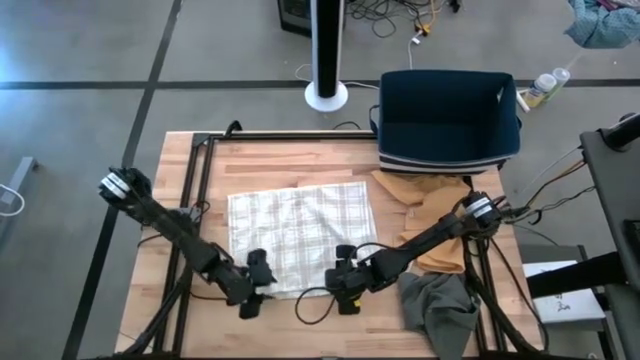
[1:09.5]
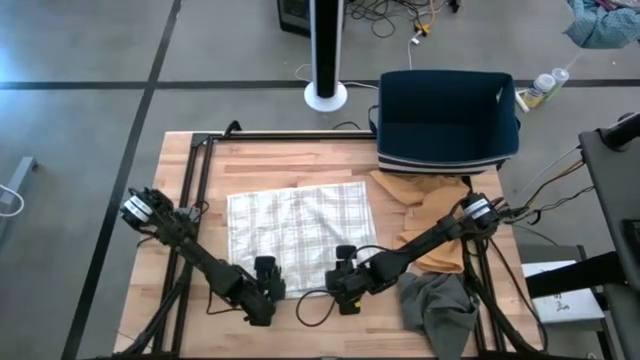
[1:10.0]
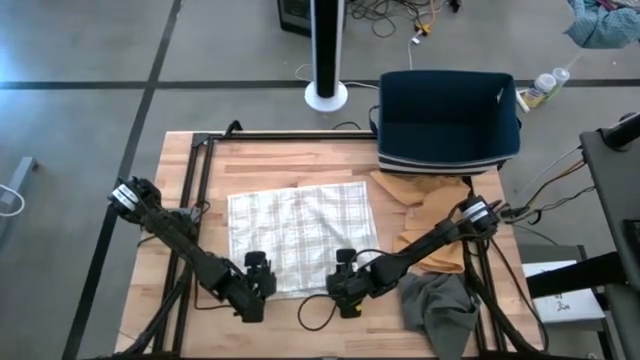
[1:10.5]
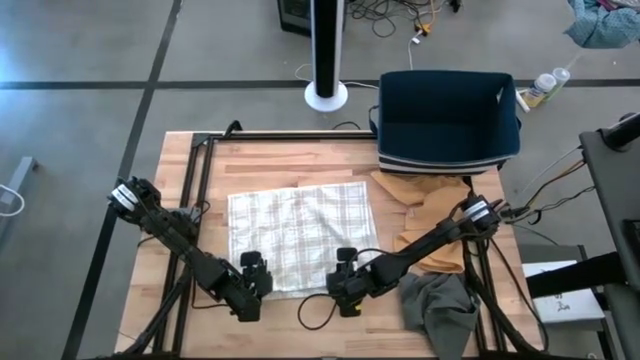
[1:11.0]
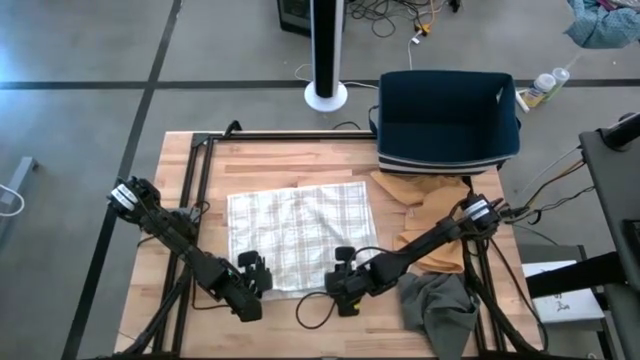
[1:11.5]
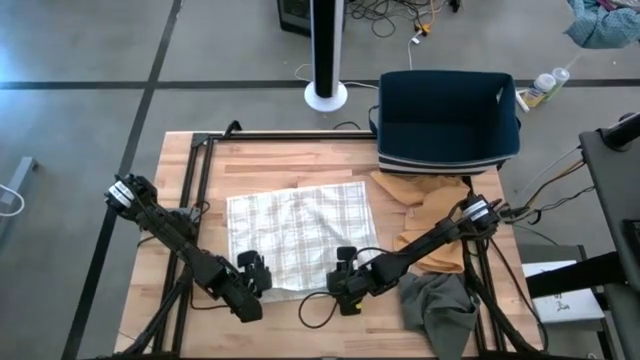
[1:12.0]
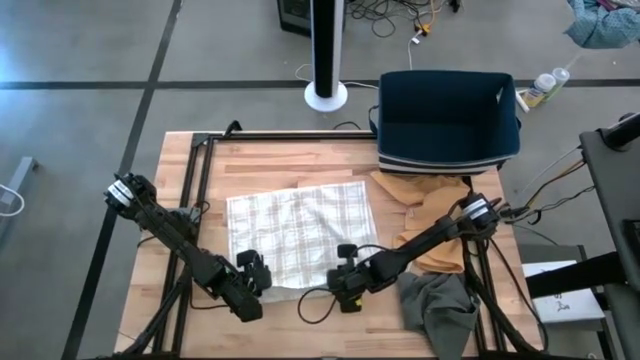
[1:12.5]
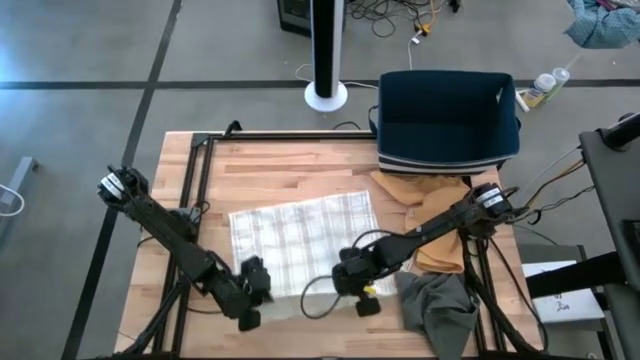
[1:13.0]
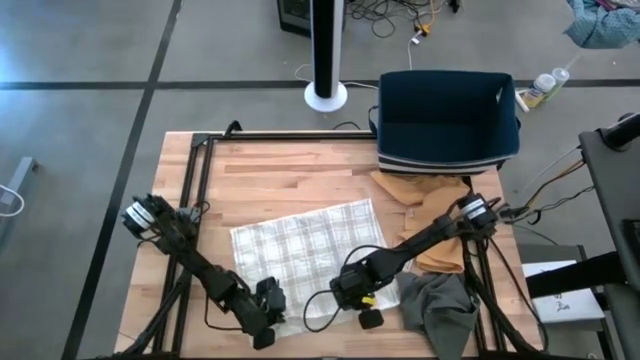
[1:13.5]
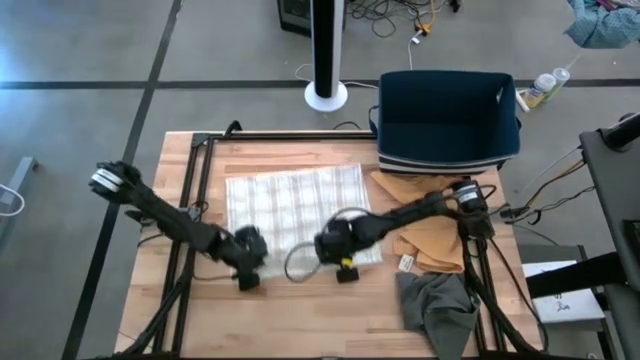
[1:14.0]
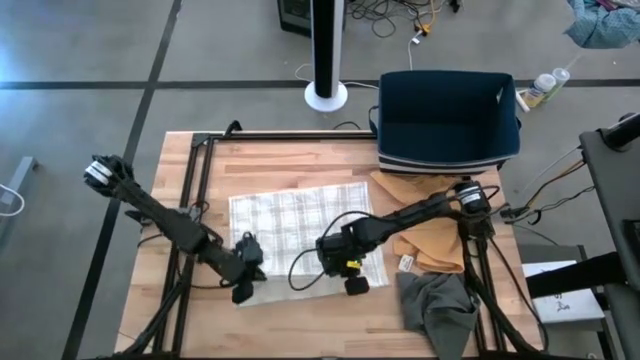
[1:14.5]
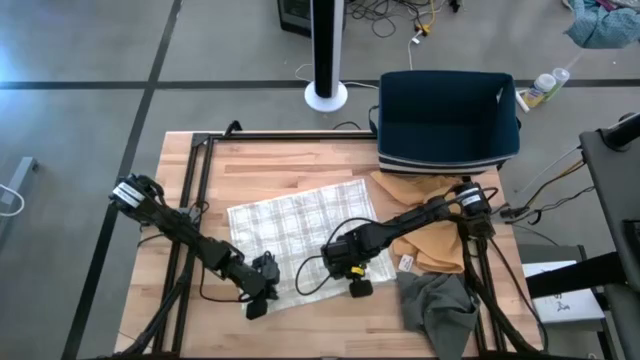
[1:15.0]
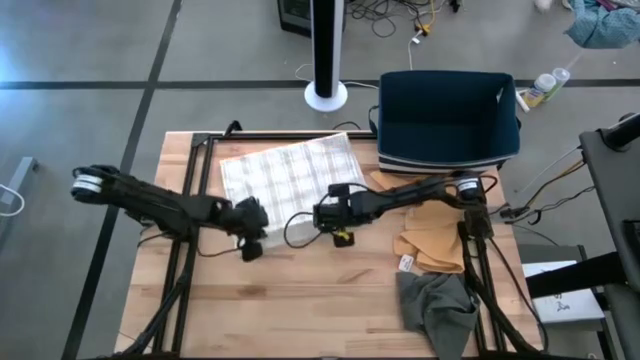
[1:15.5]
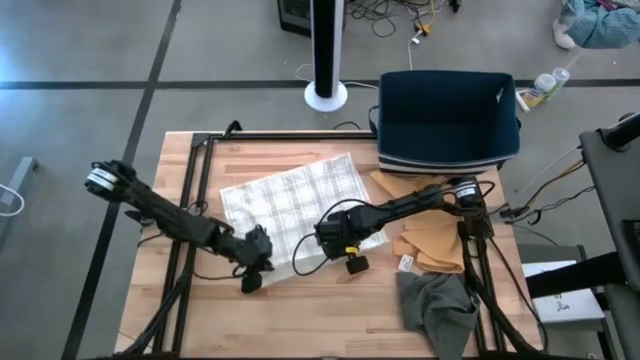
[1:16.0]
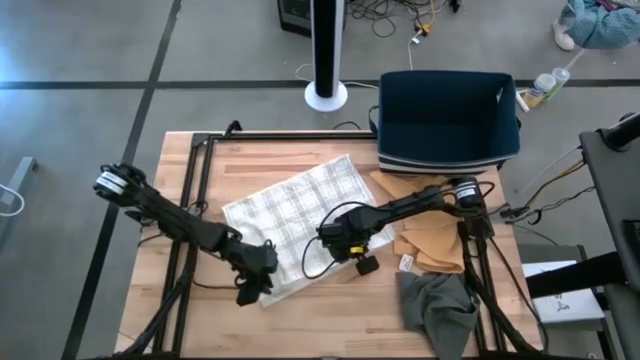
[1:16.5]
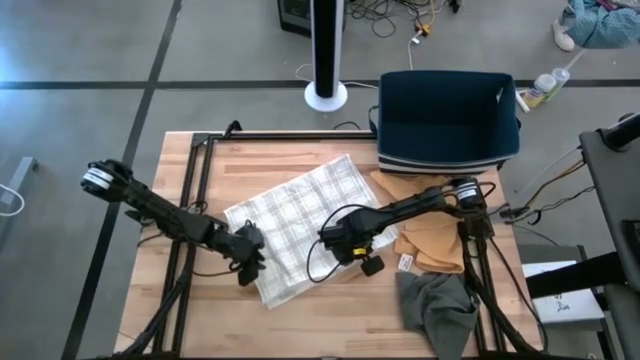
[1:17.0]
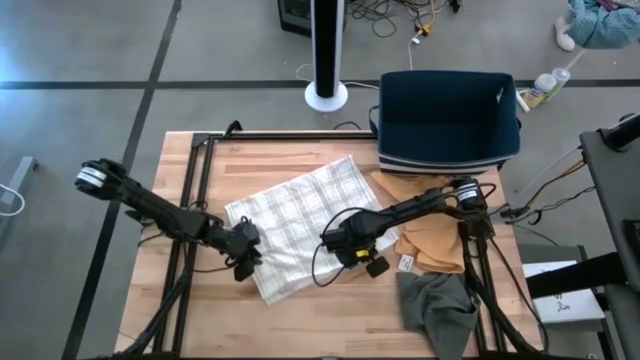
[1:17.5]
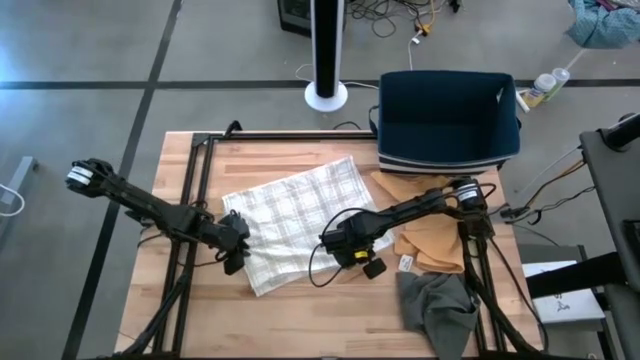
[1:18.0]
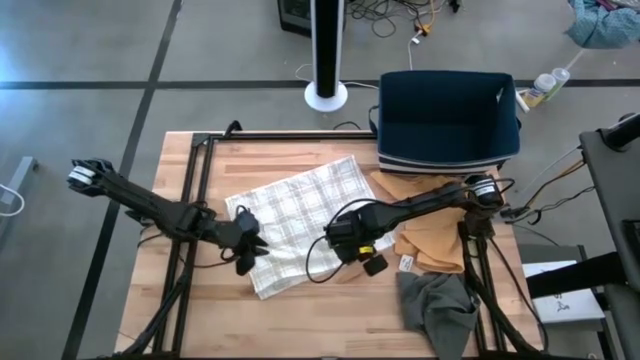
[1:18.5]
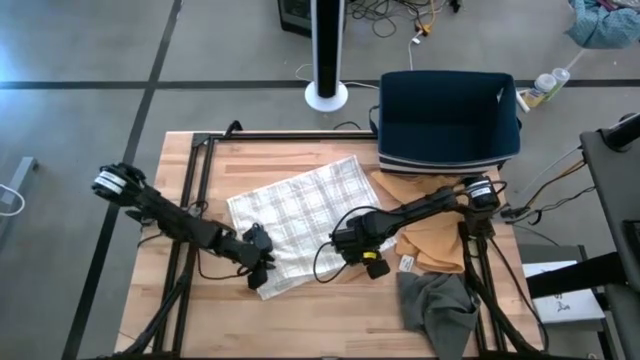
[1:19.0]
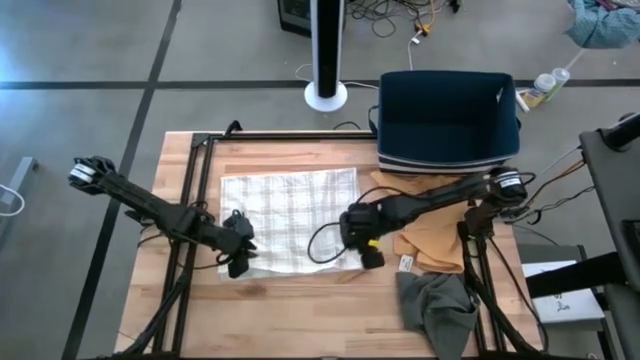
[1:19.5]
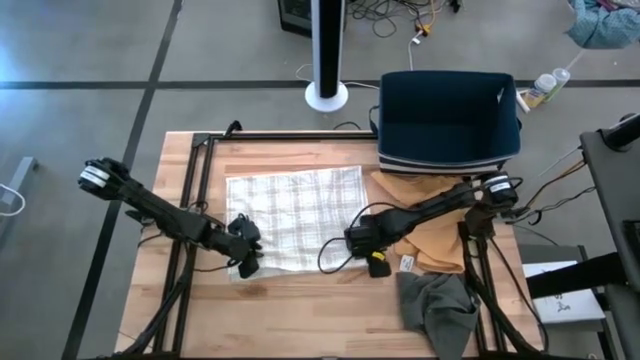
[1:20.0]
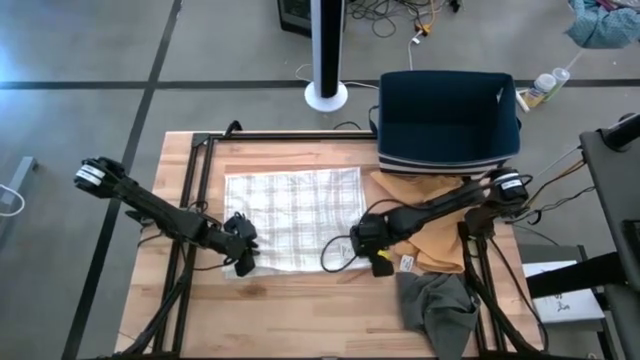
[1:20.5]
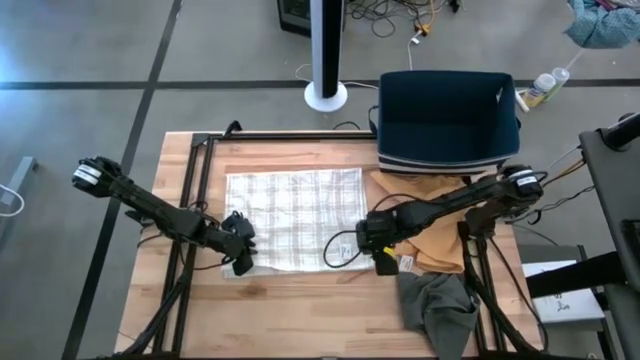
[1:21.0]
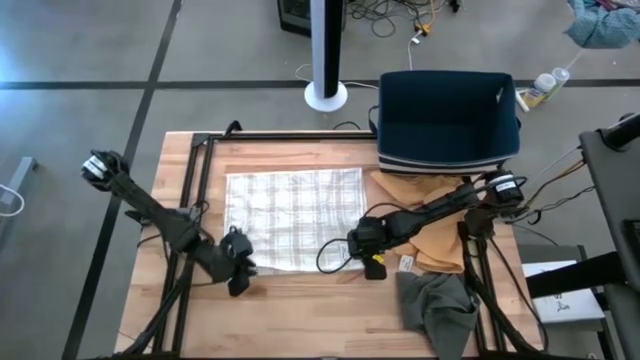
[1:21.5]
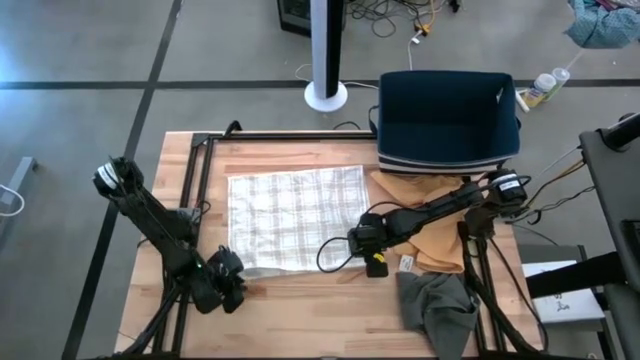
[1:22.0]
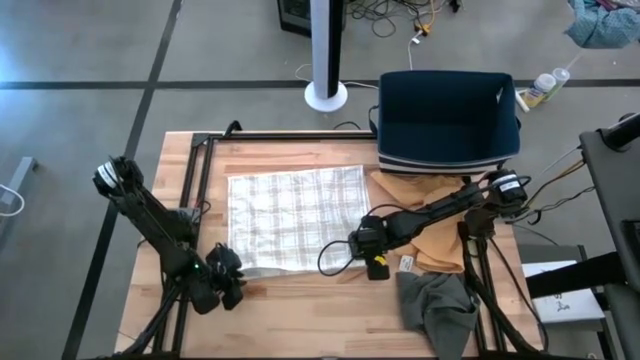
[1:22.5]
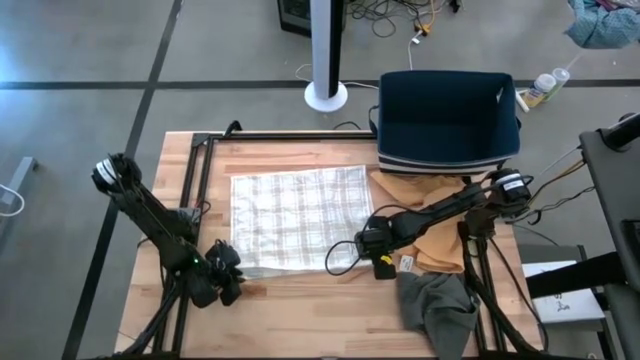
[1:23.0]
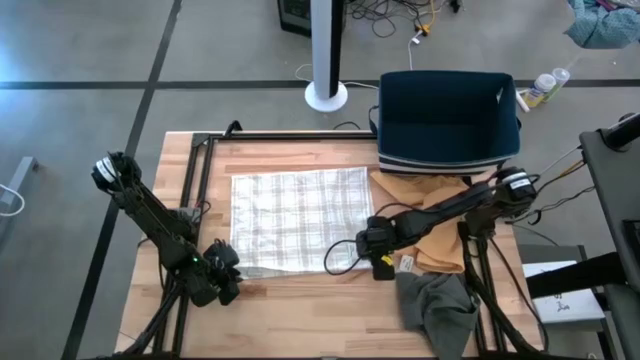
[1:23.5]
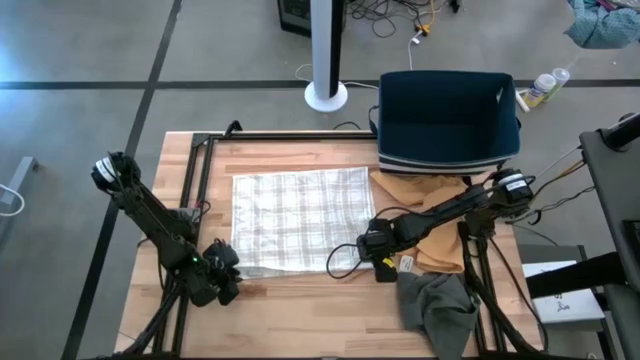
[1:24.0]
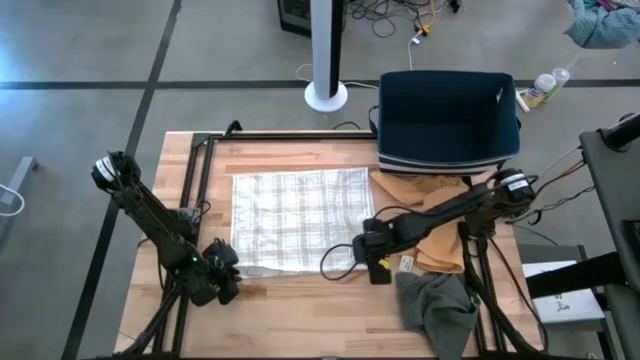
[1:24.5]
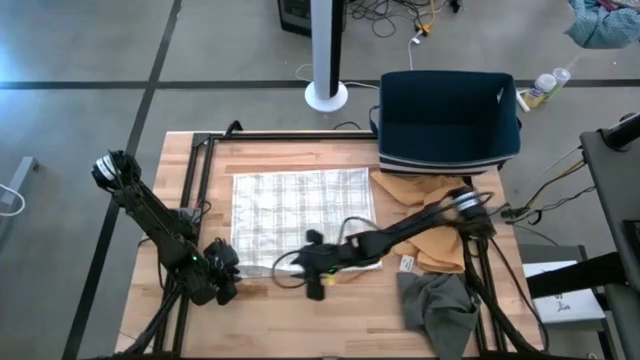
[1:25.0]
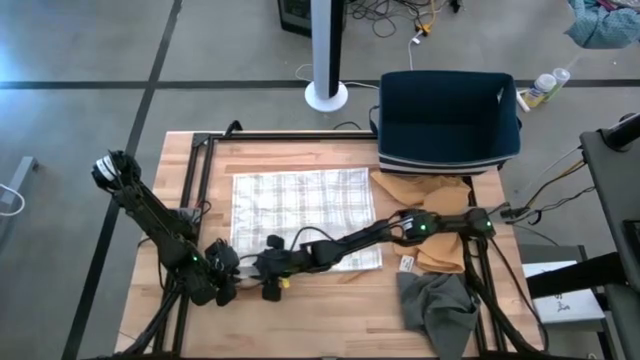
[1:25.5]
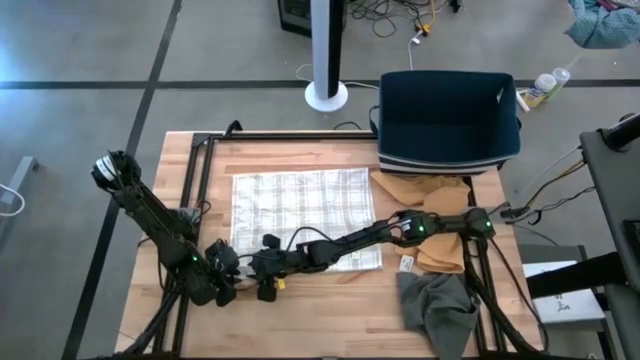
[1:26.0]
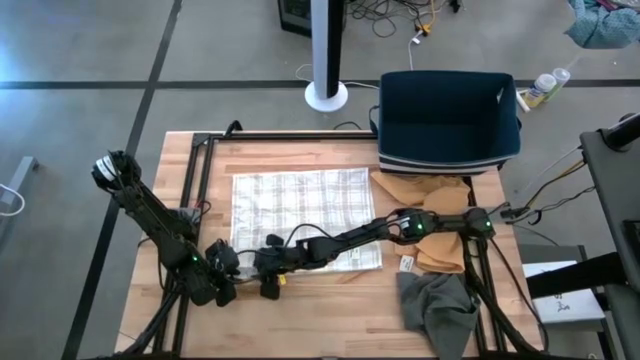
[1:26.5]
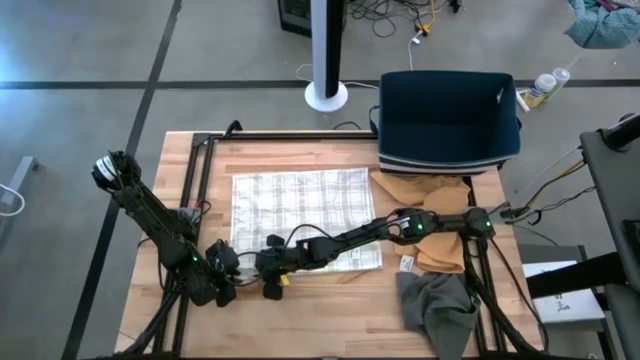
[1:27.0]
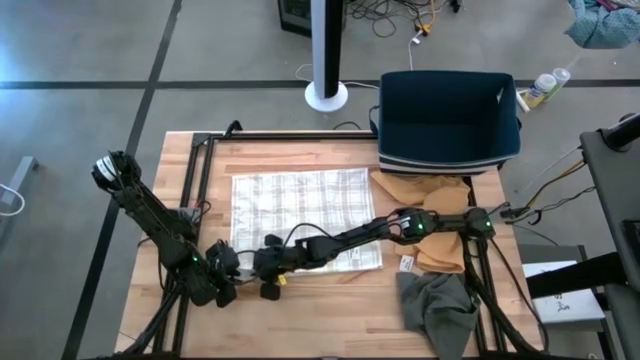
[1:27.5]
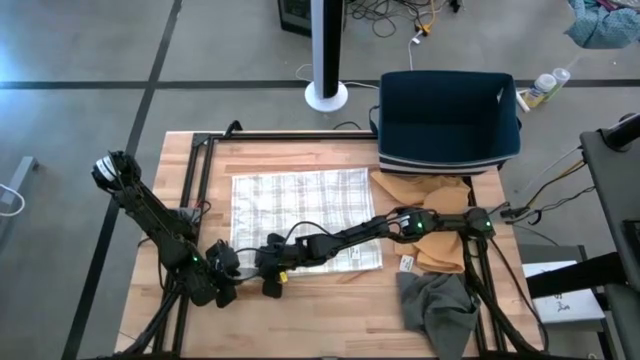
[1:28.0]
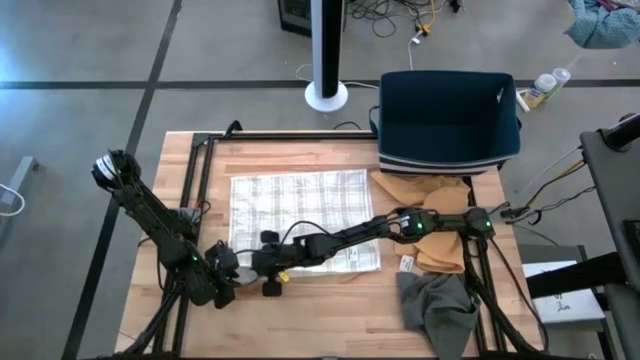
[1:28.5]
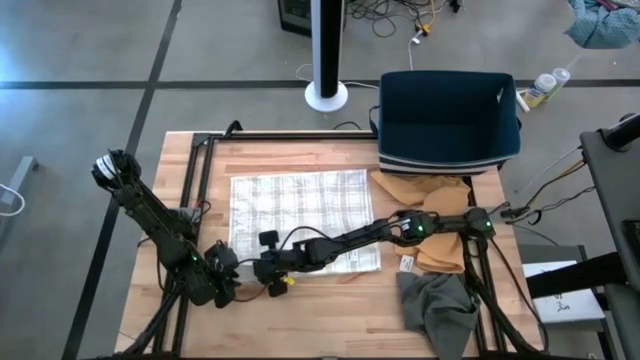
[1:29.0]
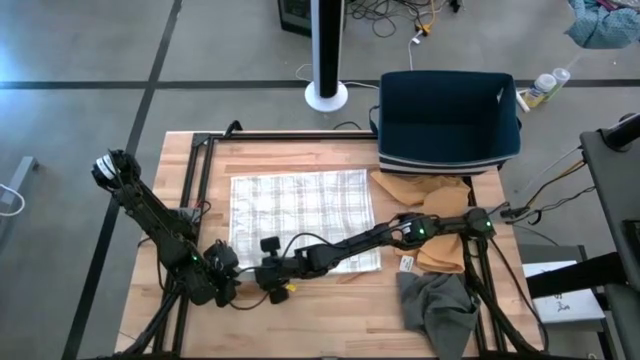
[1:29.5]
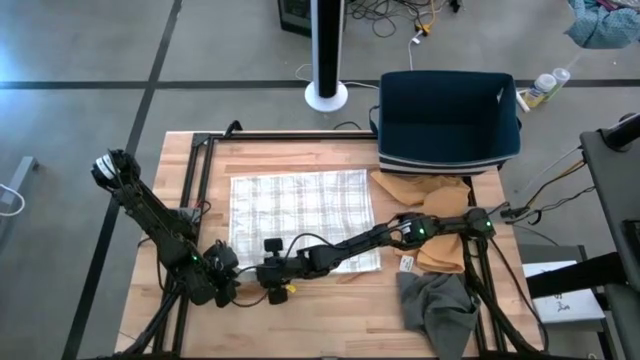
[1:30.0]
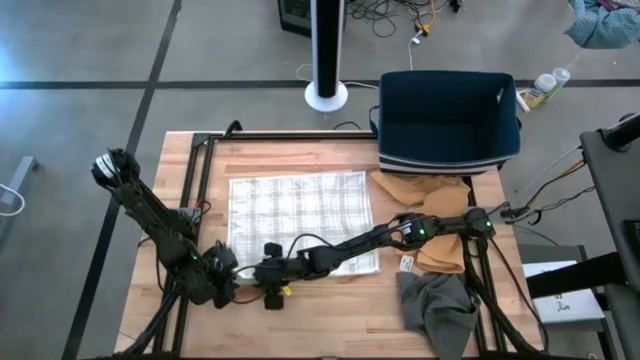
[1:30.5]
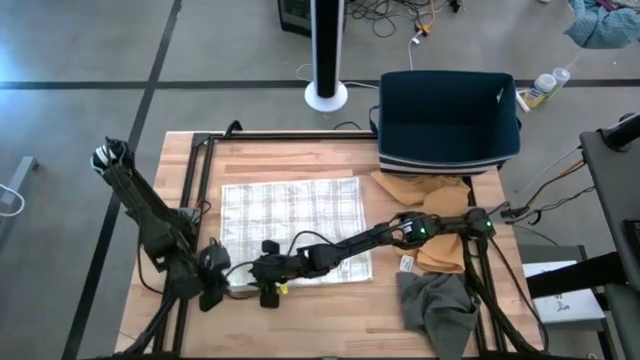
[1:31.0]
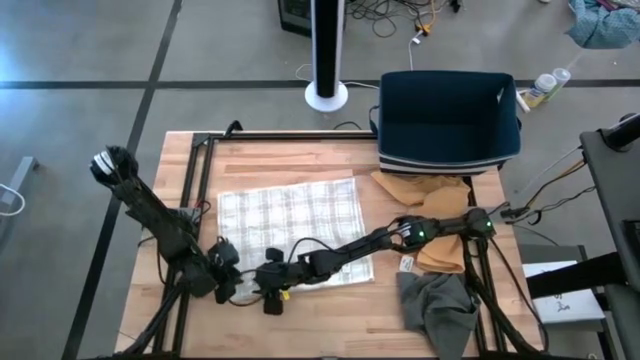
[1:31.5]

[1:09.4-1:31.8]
Task: Fold towel
Fold the white towel
